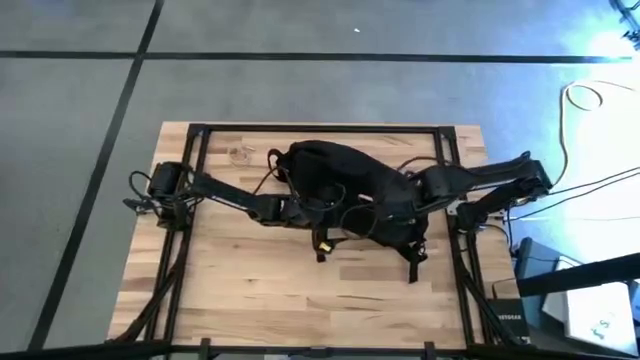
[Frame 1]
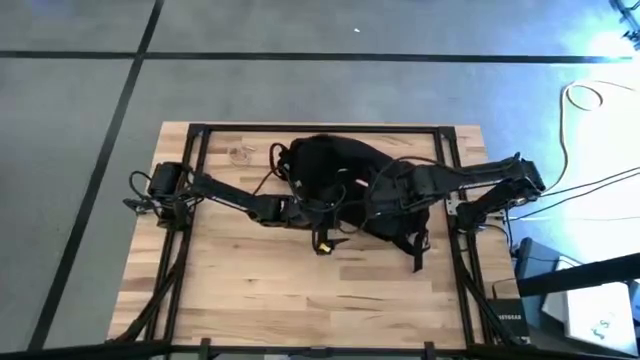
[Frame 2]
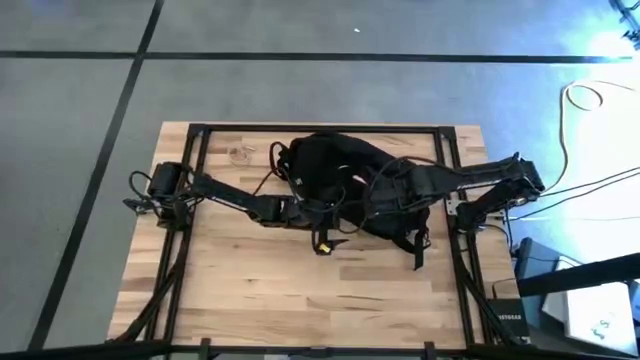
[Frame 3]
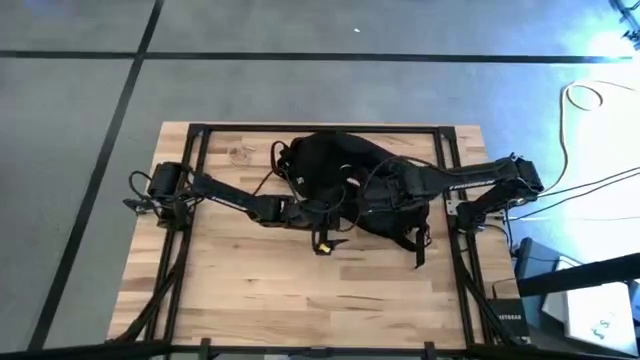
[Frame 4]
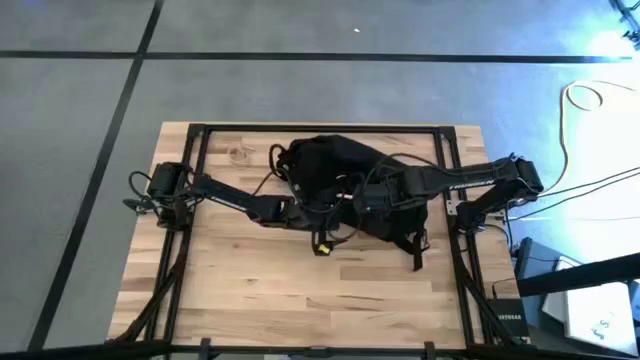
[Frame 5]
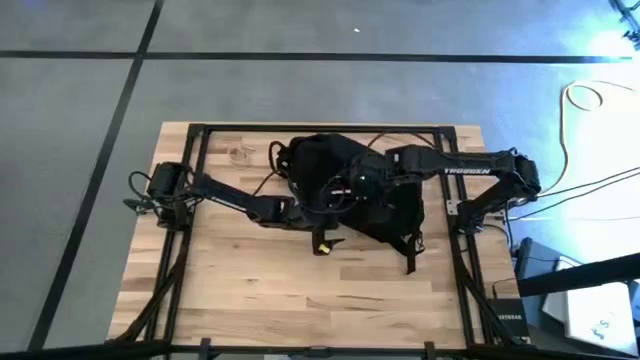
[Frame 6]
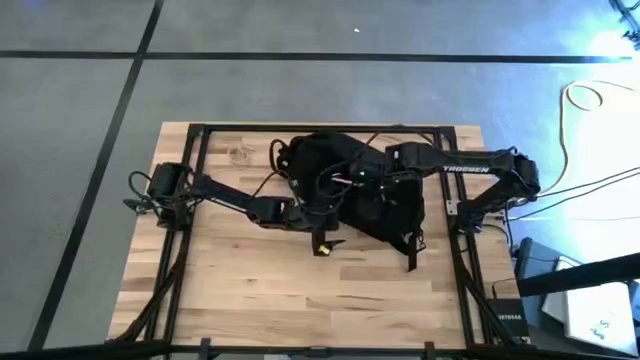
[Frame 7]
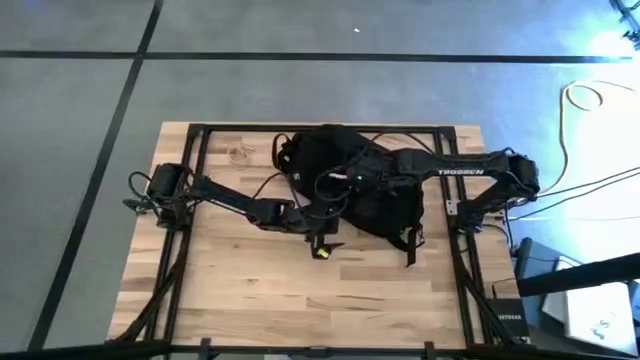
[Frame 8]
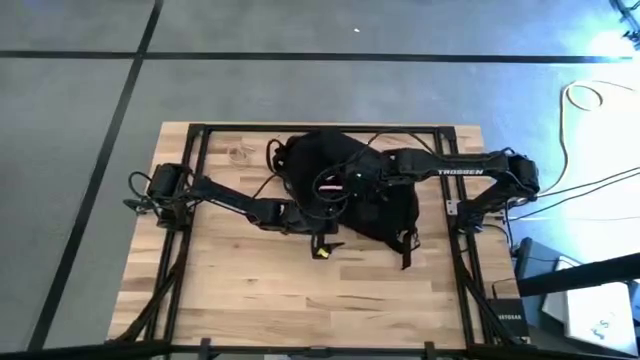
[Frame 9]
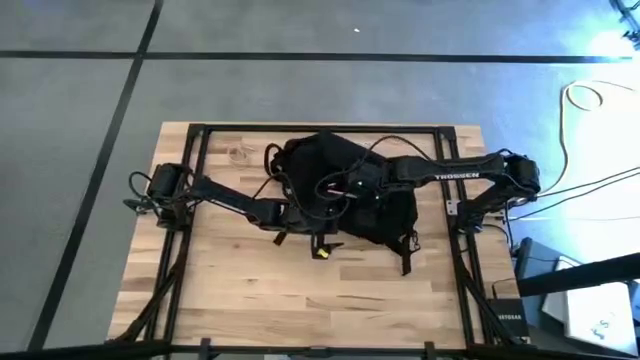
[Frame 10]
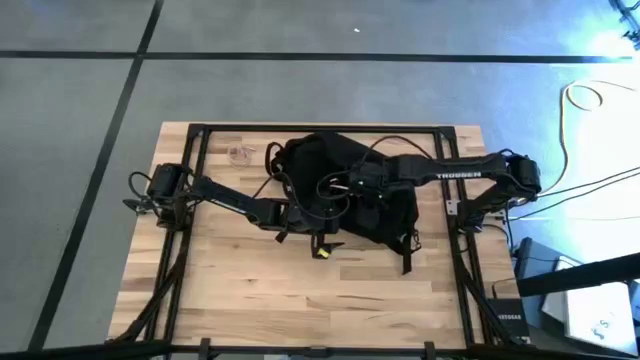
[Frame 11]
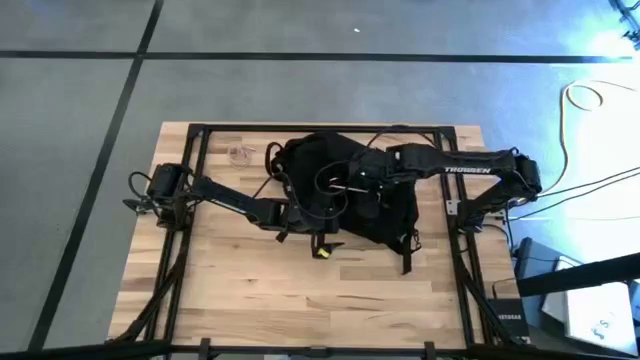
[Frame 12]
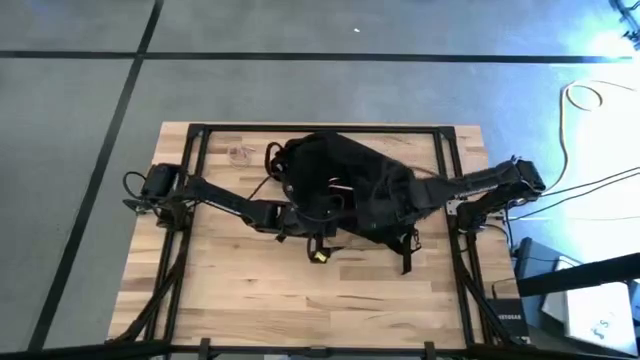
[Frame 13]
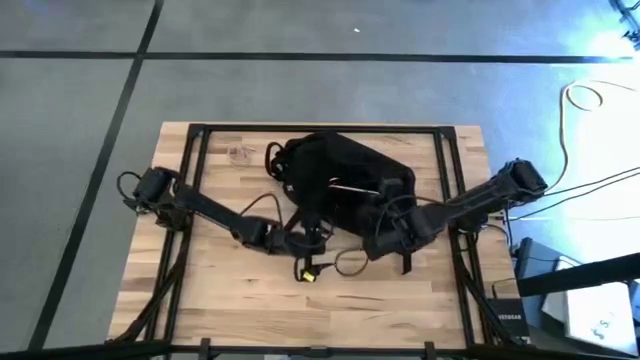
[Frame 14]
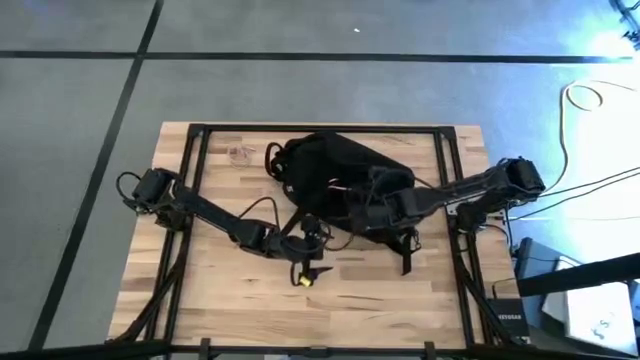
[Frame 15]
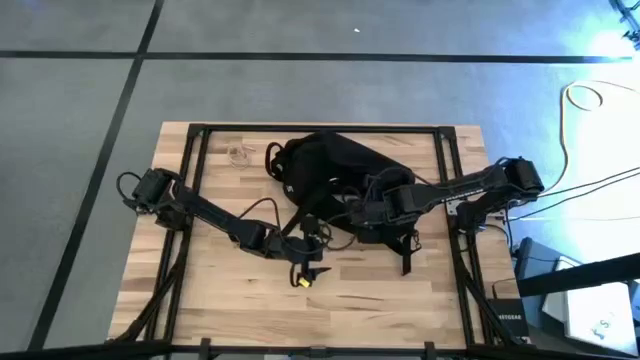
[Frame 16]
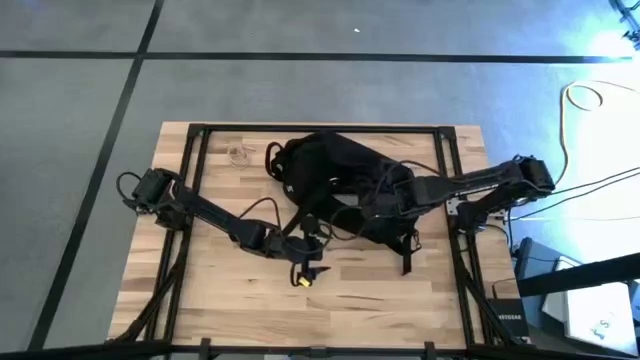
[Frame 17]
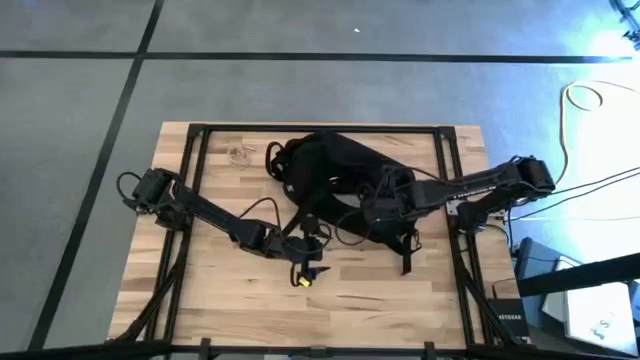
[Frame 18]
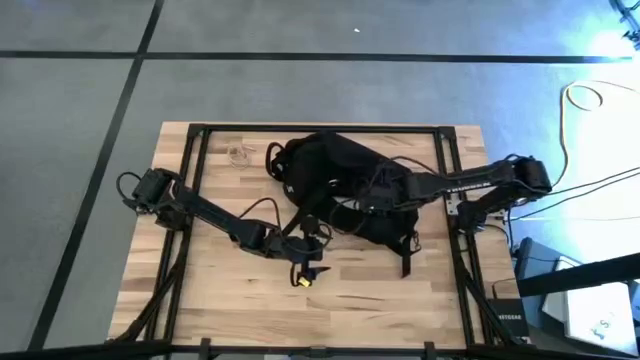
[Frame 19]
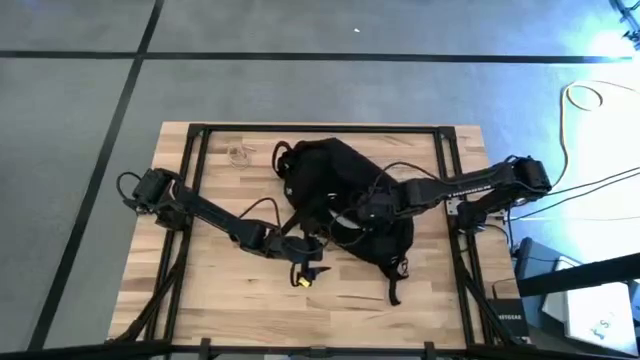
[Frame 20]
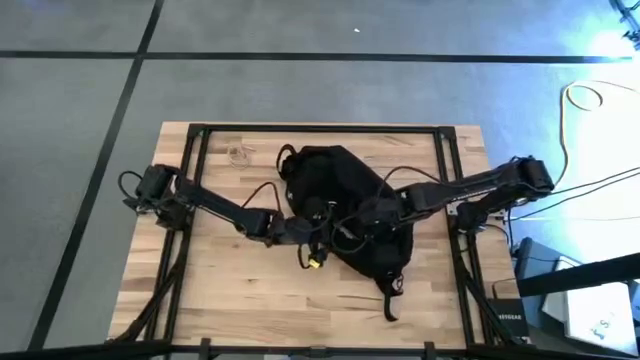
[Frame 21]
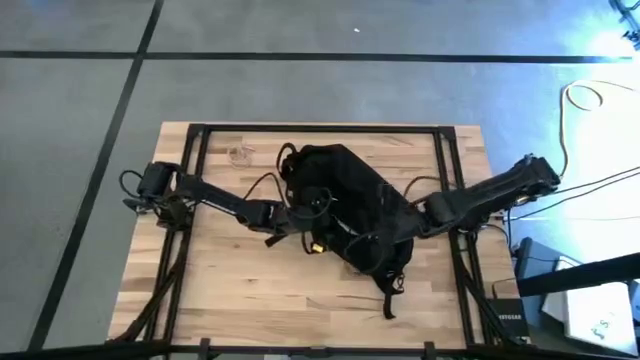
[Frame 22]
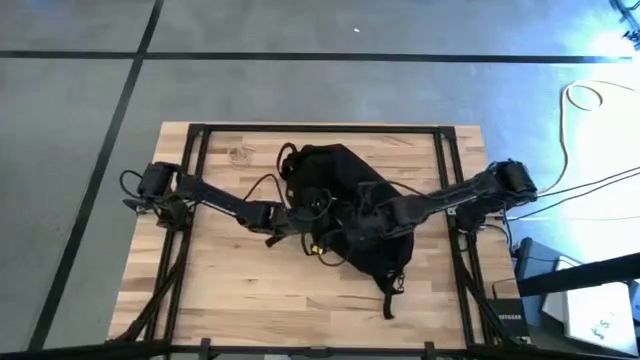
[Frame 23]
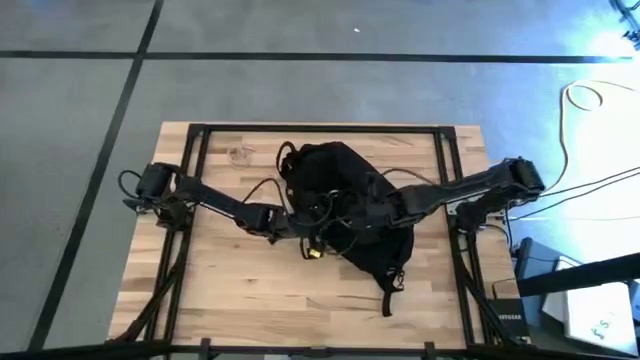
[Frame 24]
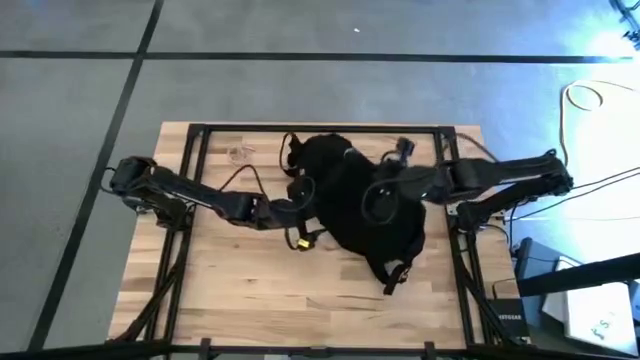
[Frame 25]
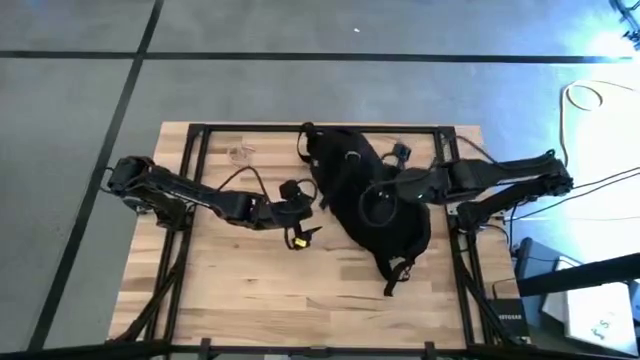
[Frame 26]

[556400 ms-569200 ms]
Task: Unpack backpack
Put the pink cellphone into the black backpack

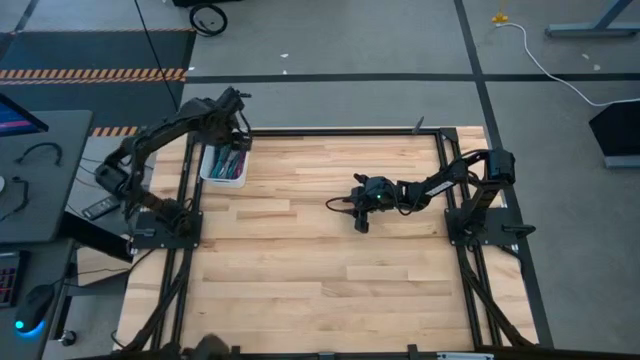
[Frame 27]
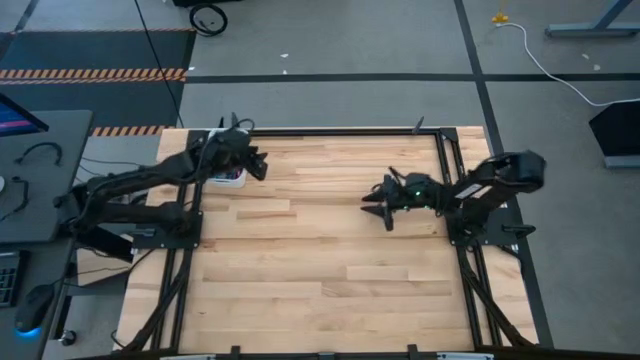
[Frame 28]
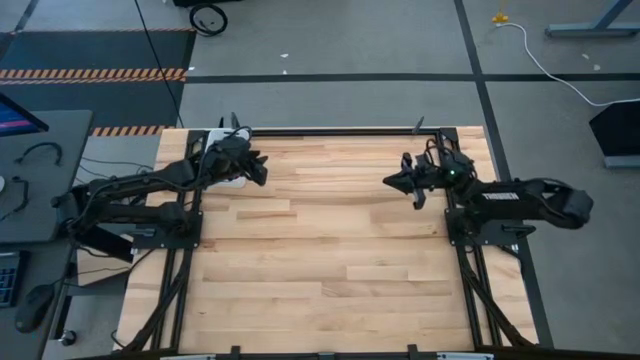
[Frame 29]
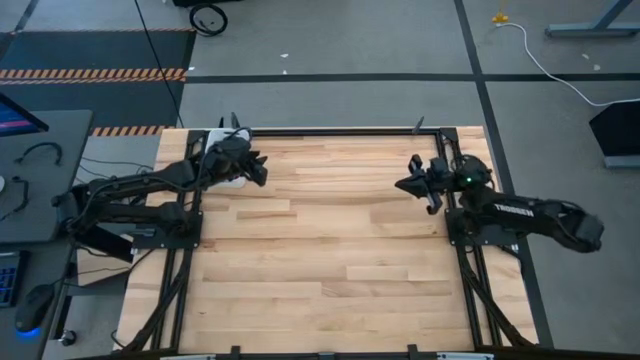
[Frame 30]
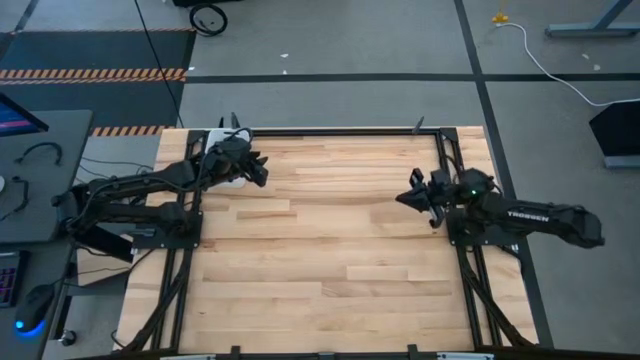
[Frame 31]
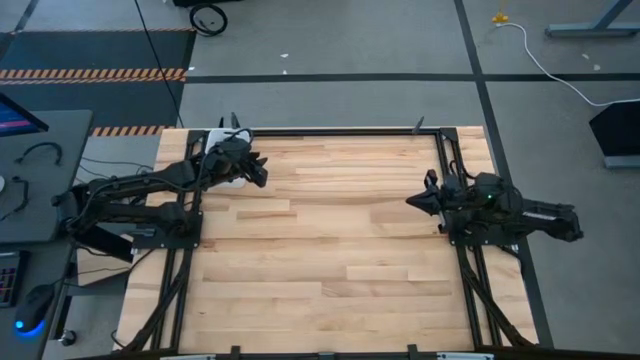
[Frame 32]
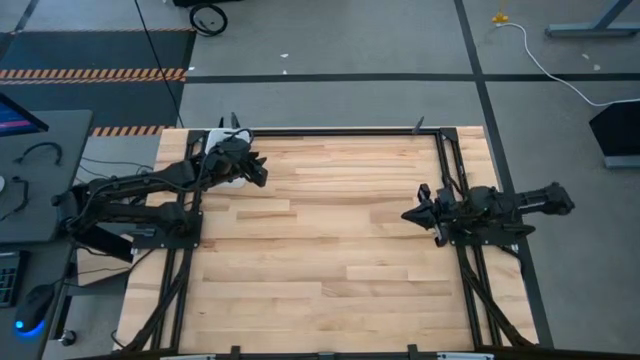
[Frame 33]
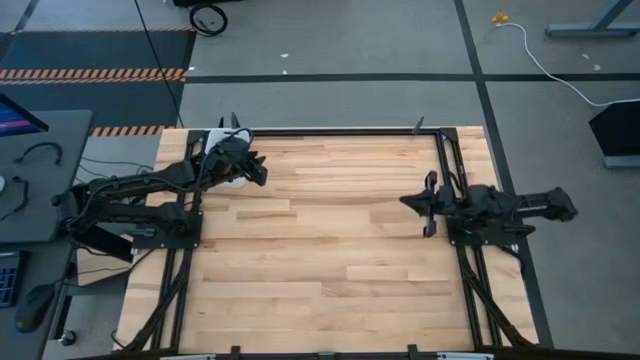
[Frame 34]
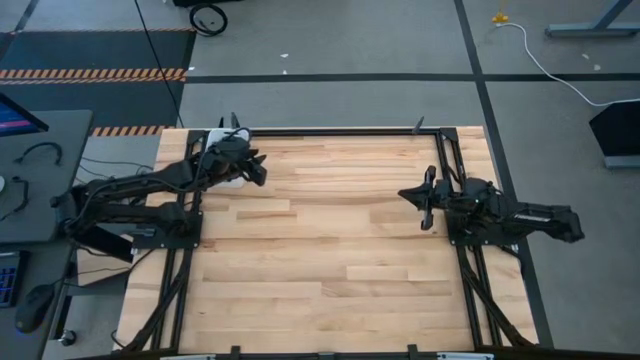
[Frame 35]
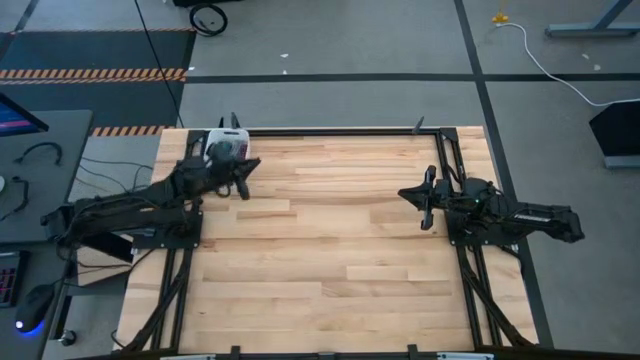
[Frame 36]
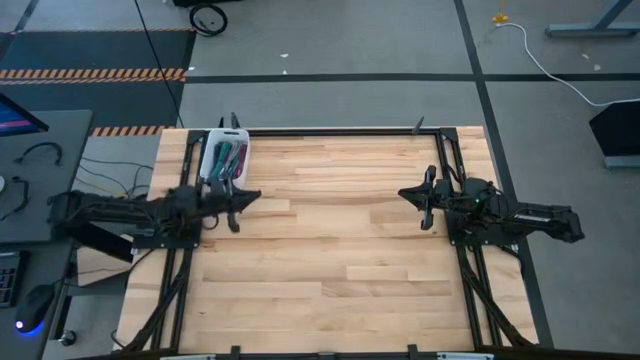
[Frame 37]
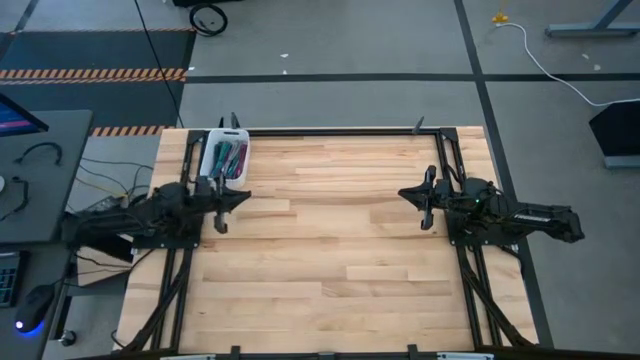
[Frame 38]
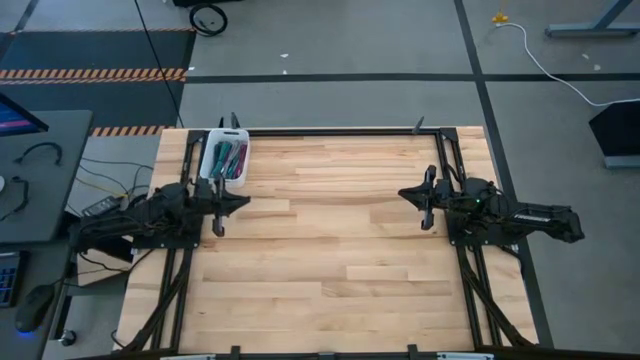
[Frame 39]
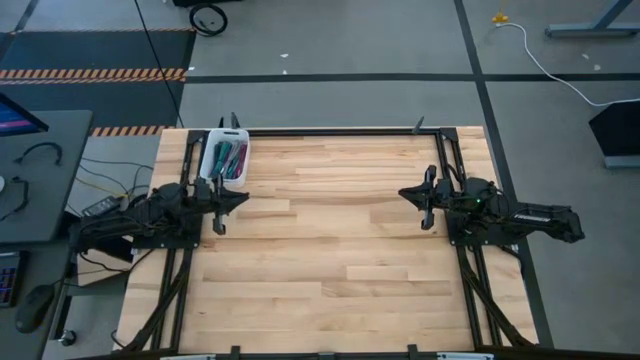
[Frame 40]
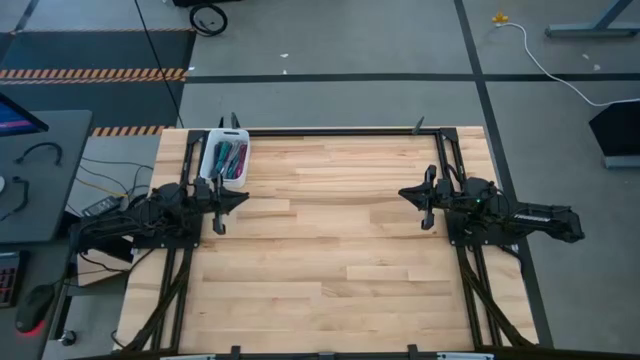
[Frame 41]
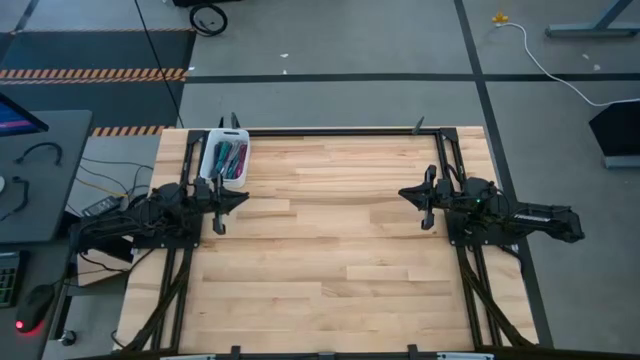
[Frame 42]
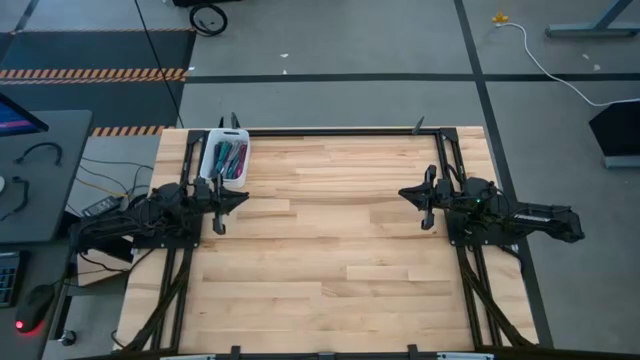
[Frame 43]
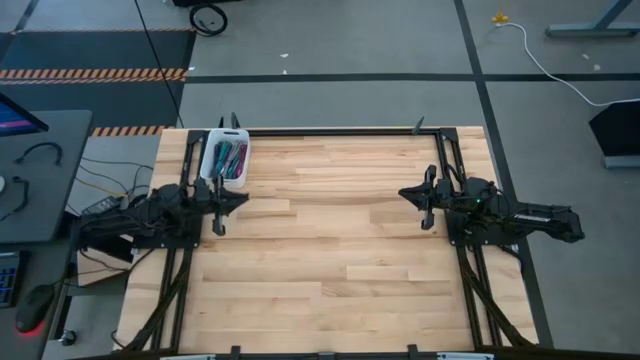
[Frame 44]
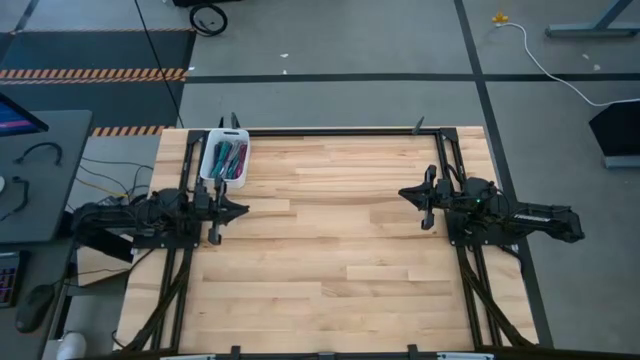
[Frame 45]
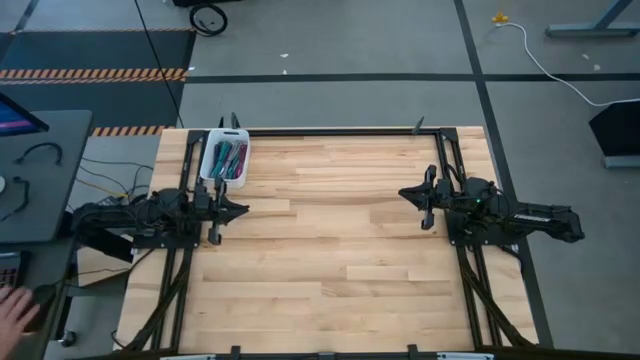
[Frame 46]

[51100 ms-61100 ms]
Task: Pick and place USB-C Cables
Return to Home Position
